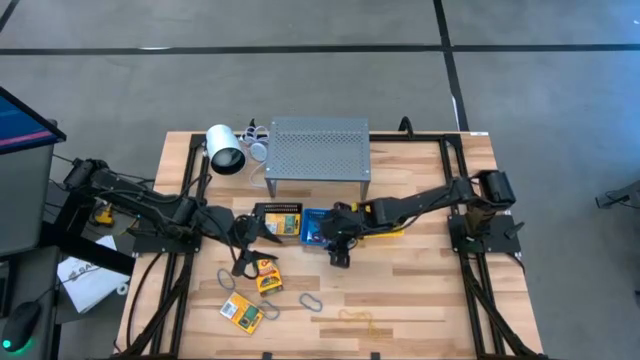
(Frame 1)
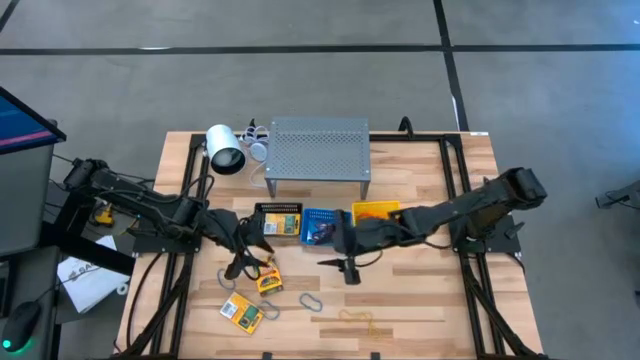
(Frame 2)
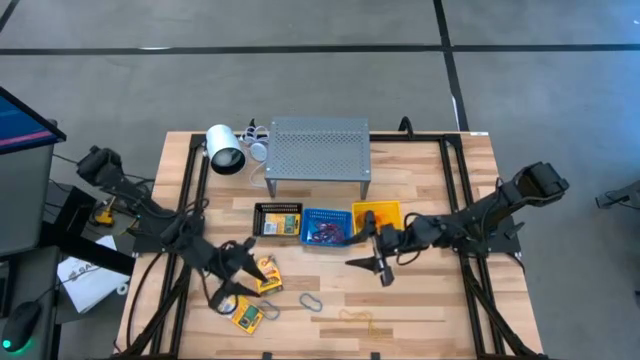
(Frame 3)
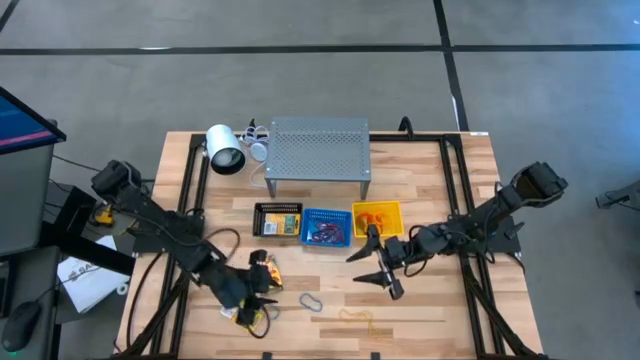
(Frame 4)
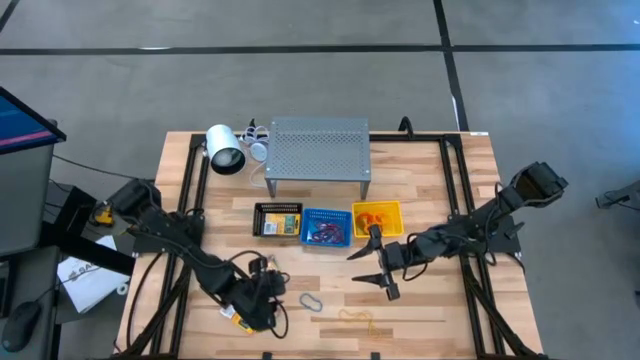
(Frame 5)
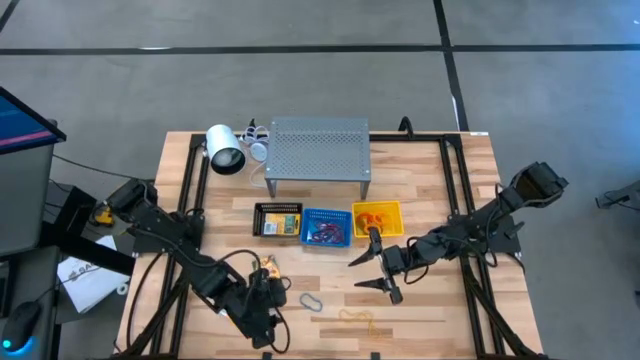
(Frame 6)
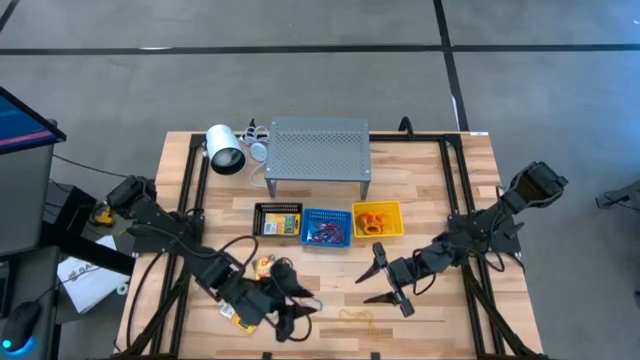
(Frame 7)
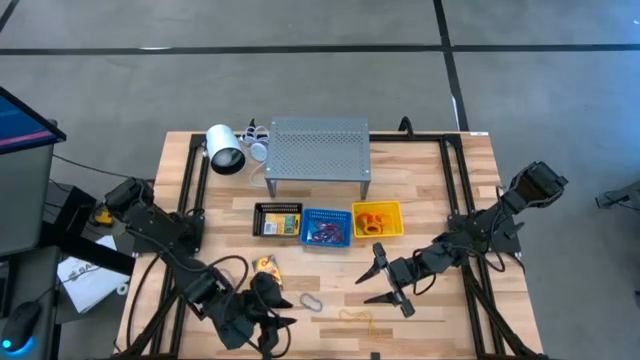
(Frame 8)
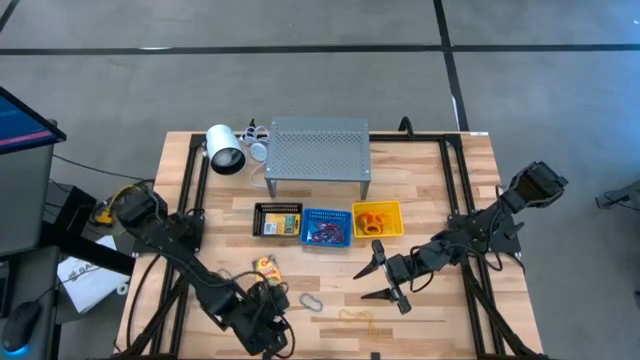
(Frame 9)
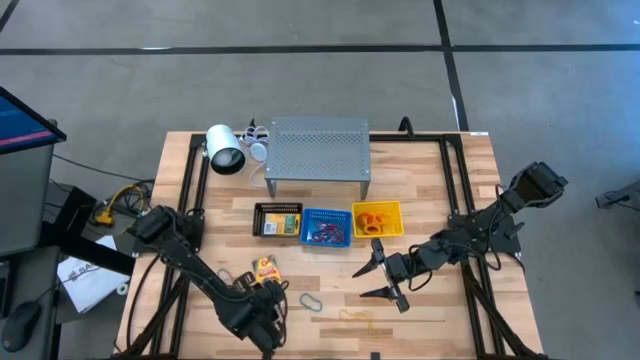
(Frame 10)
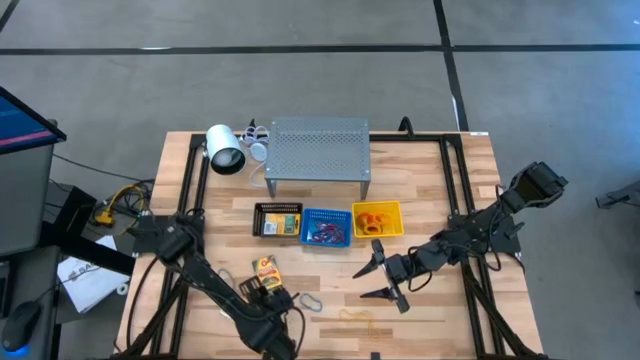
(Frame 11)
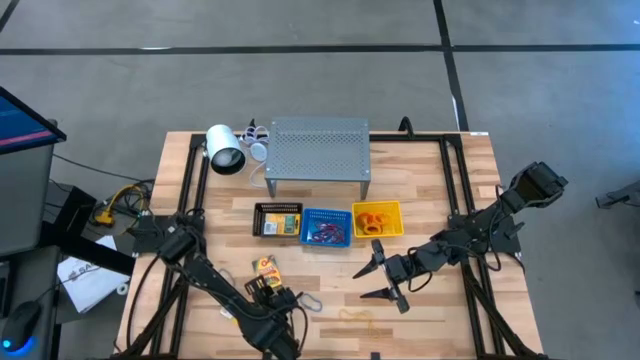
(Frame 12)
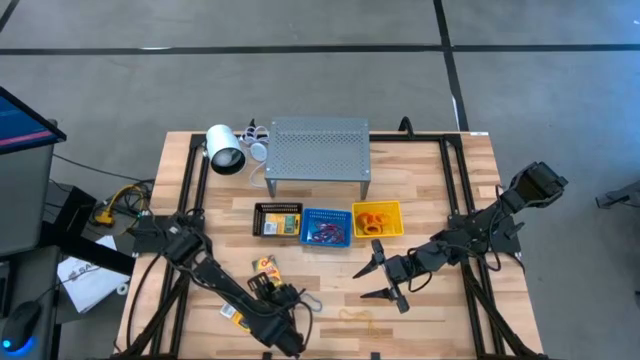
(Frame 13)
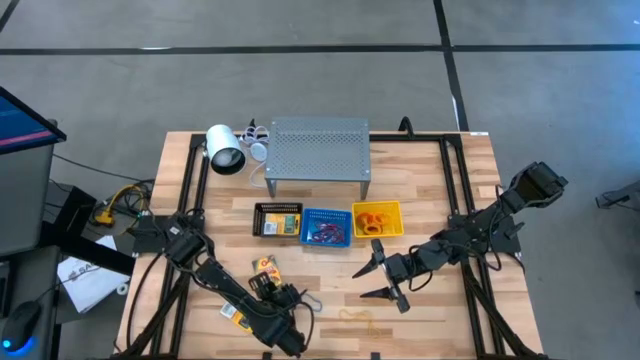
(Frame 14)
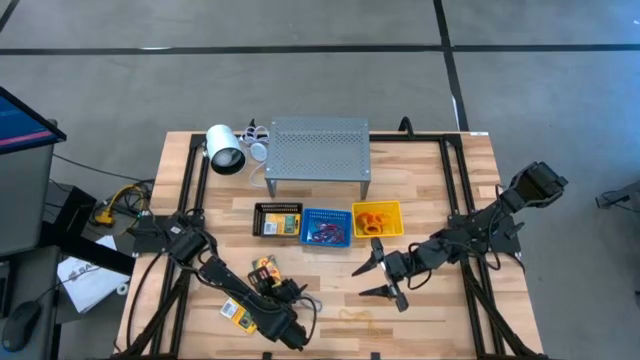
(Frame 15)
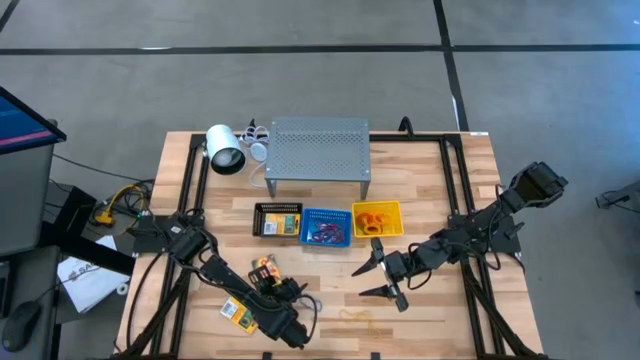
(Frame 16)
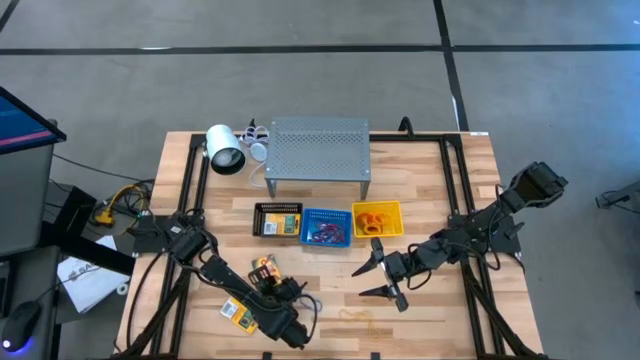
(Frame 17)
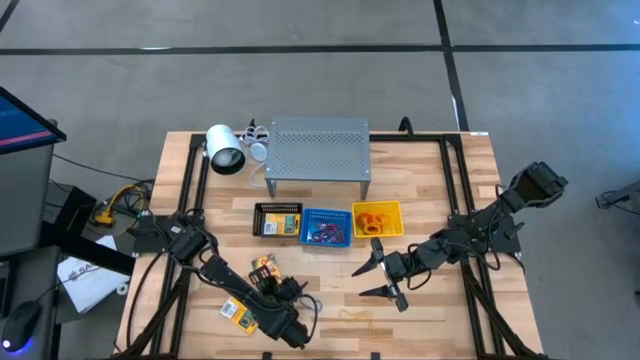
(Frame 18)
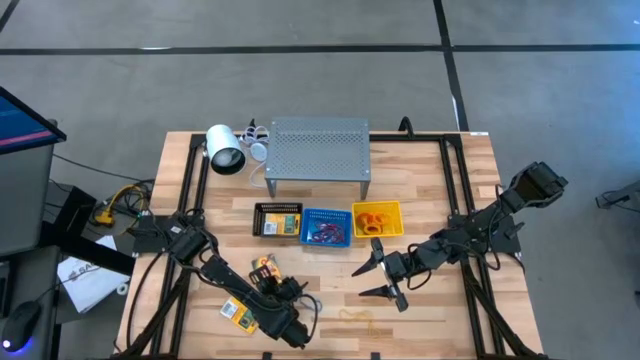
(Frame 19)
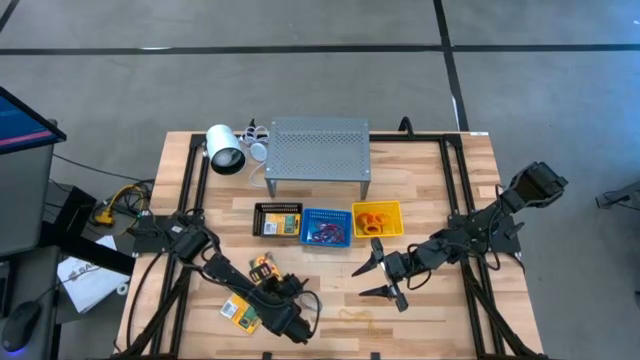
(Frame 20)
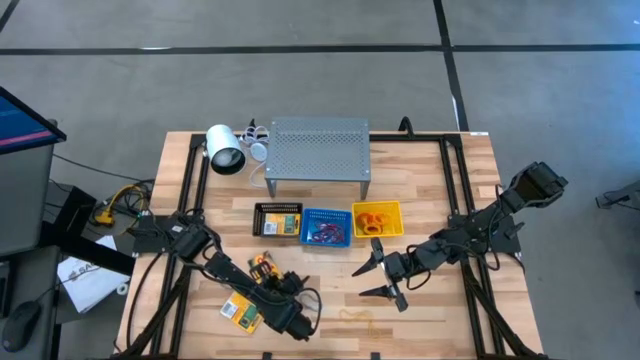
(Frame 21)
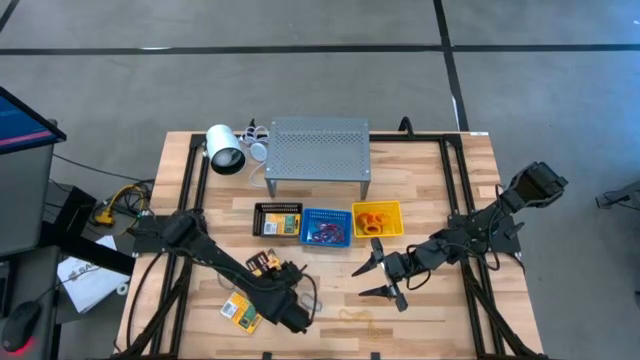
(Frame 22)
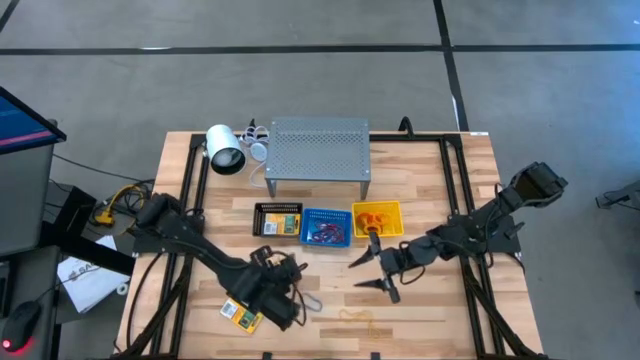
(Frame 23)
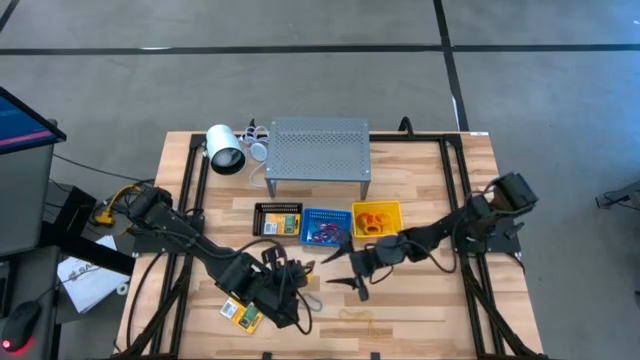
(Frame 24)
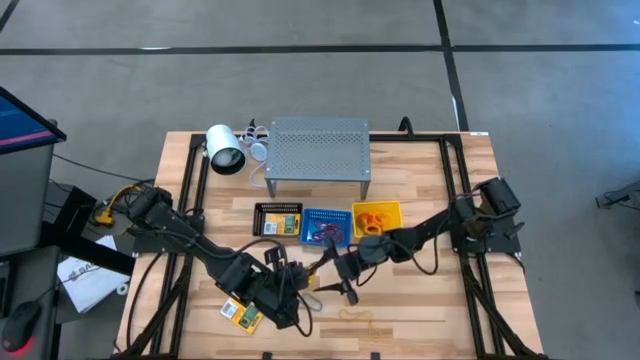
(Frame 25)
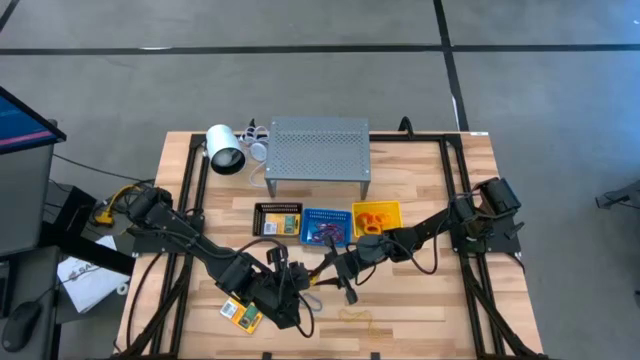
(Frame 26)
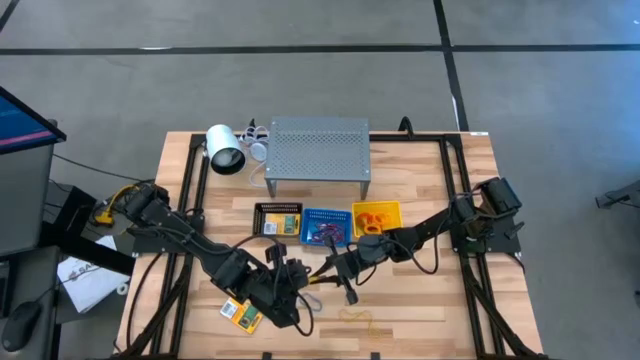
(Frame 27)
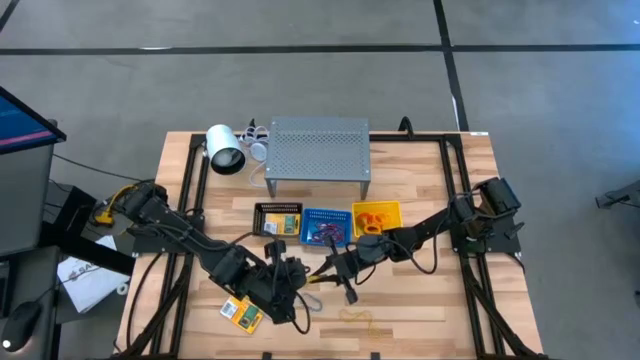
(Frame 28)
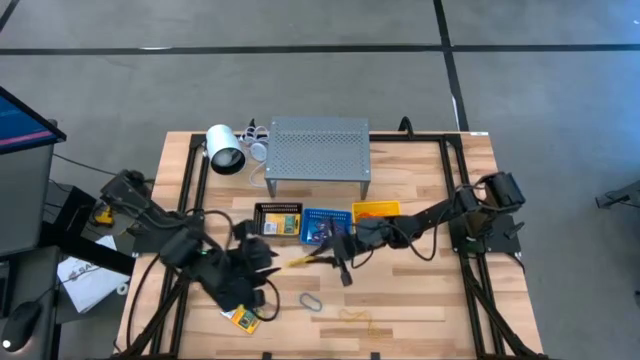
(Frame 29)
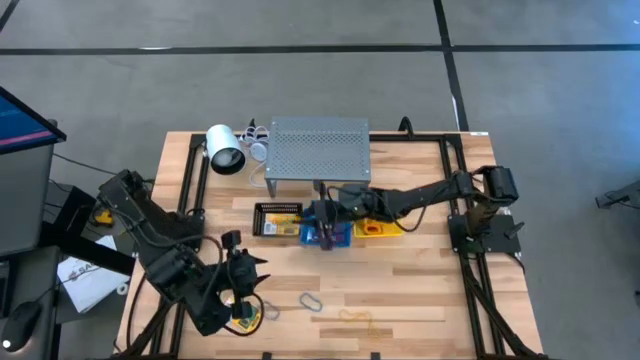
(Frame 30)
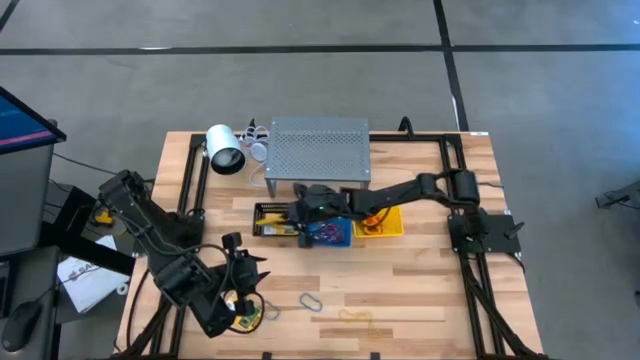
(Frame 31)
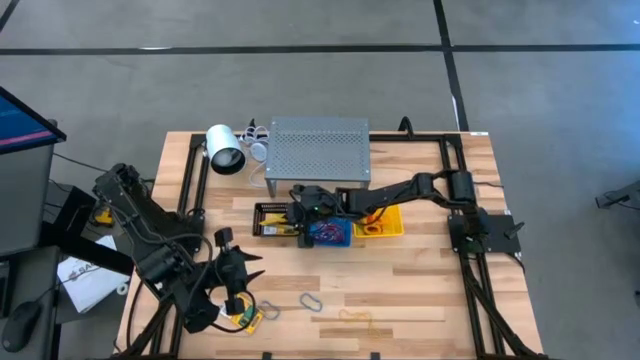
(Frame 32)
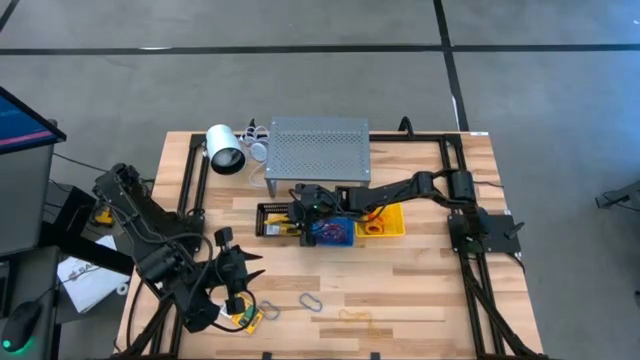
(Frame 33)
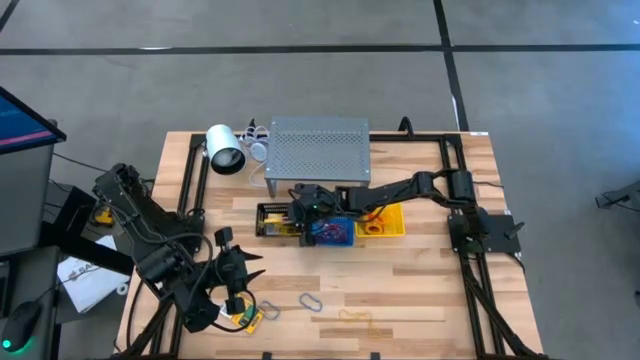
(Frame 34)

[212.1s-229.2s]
Task: Pick & Place Office Desk Supplies
Put the top box of crayons into the black bin

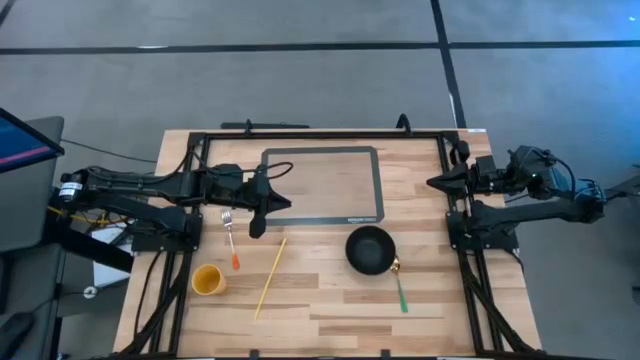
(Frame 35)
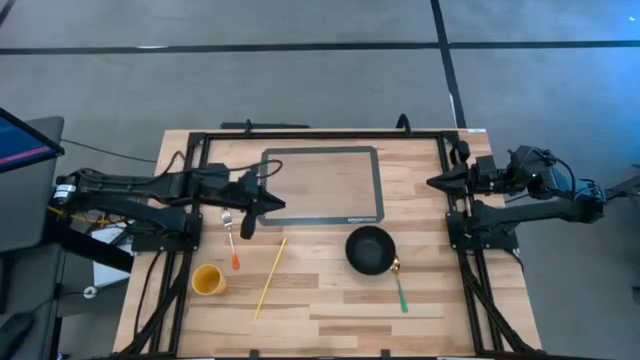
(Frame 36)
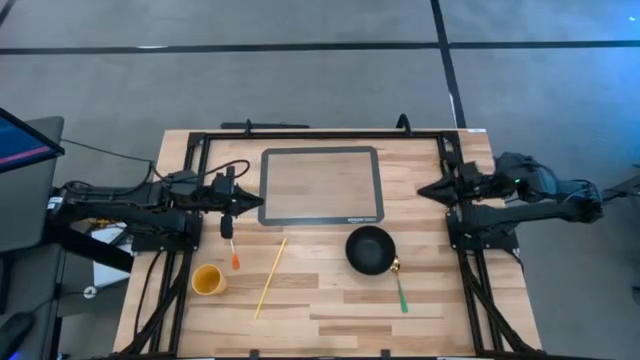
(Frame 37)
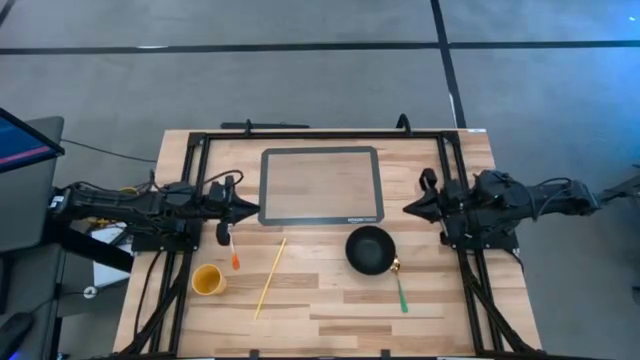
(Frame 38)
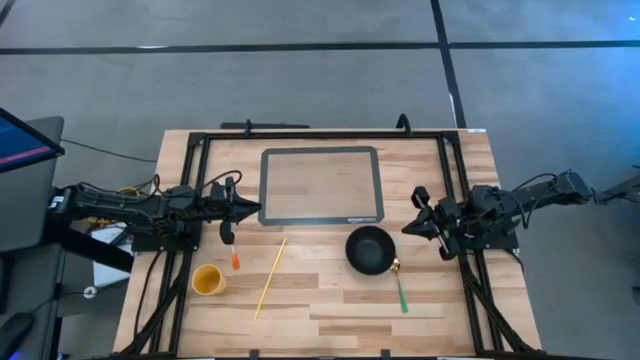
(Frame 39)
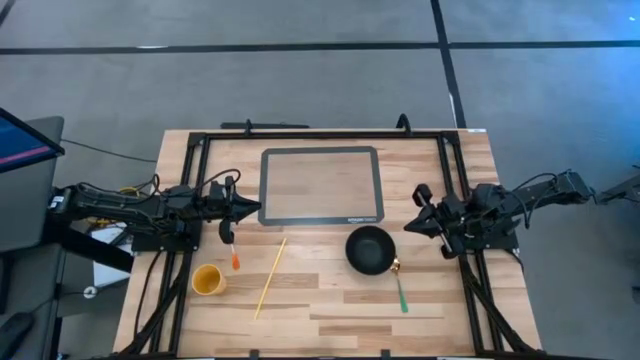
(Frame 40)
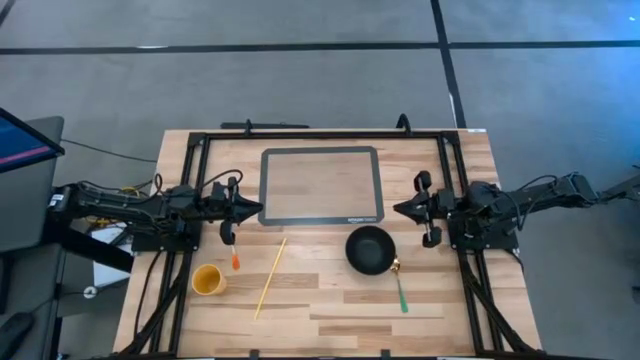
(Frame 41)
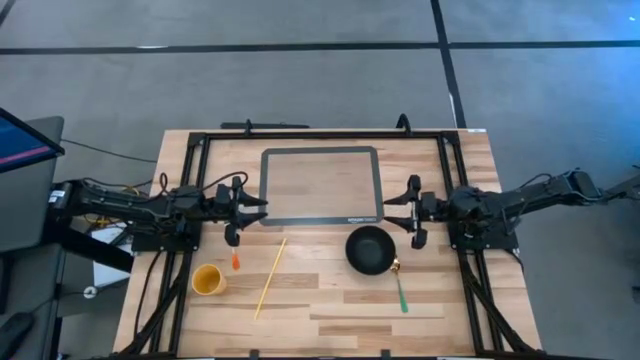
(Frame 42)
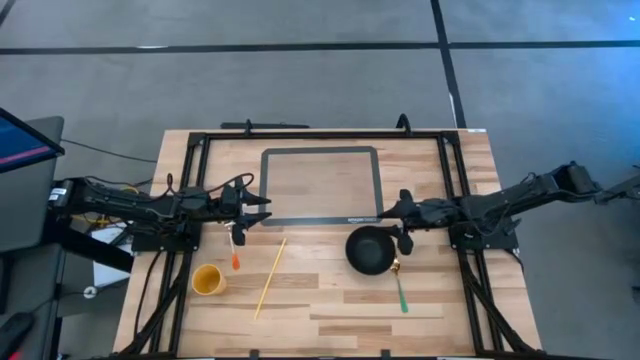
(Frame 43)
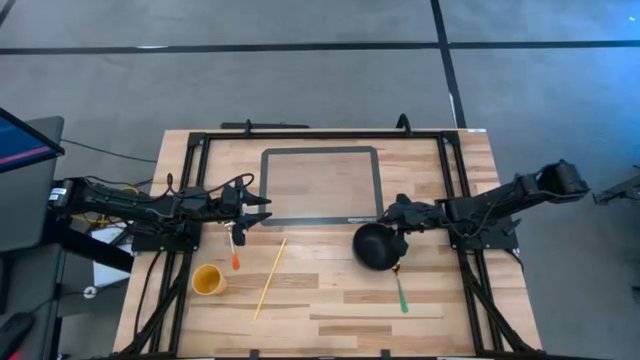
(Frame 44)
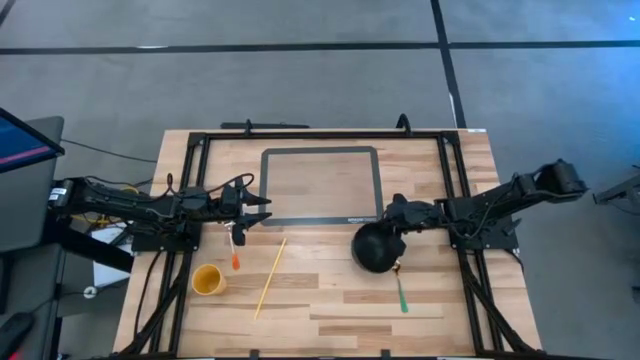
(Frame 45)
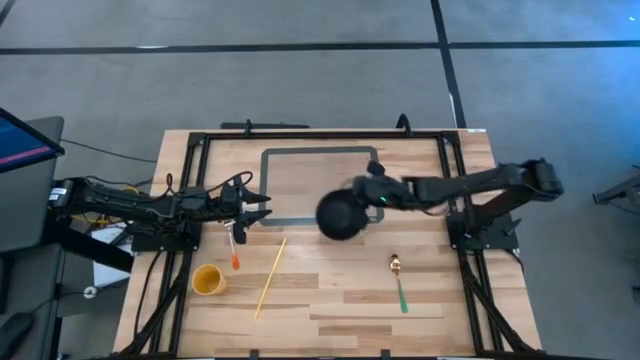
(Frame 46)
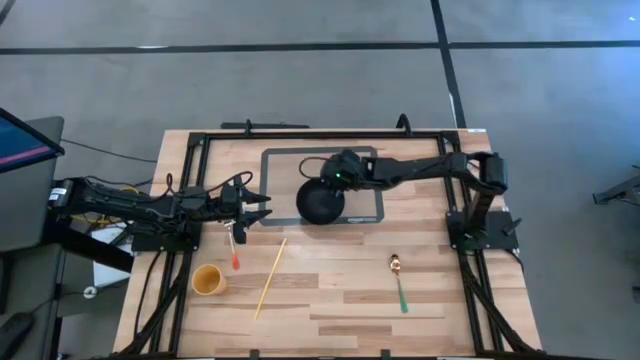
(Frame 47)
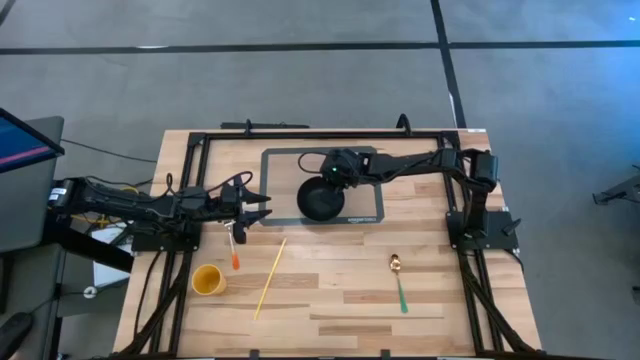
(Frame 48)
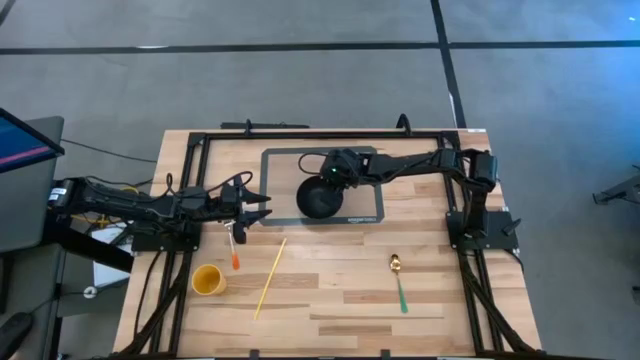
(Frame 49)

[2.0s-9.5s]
Task: Pick & Place Utensil
Put the black bowl on the transparent silicone mat
